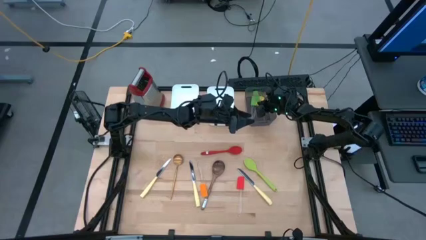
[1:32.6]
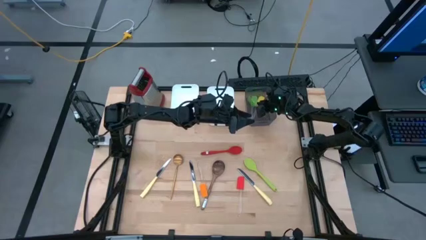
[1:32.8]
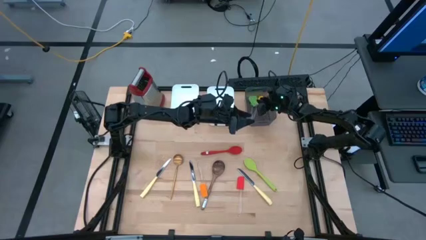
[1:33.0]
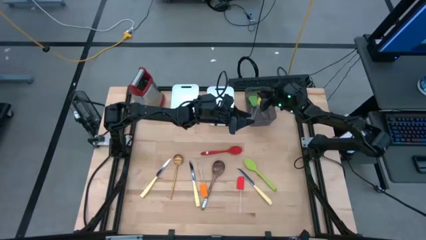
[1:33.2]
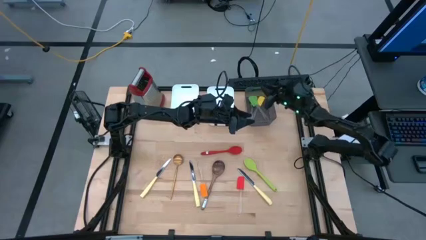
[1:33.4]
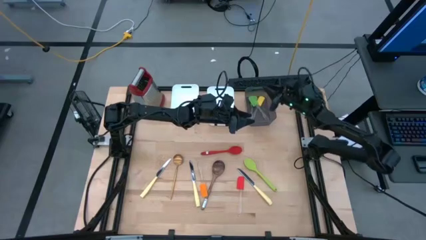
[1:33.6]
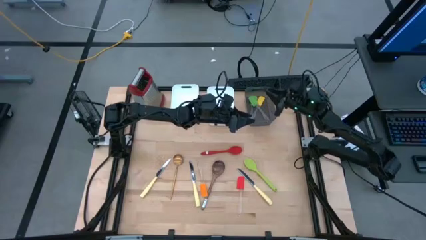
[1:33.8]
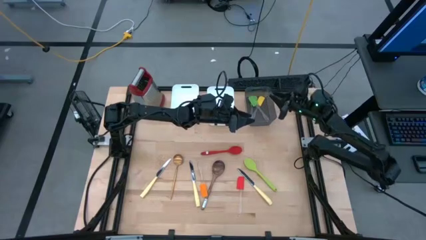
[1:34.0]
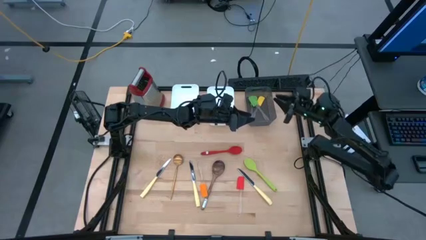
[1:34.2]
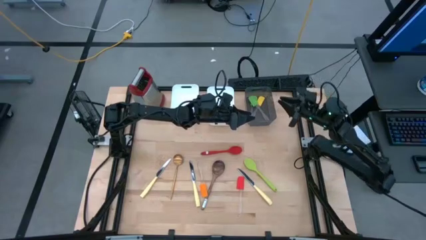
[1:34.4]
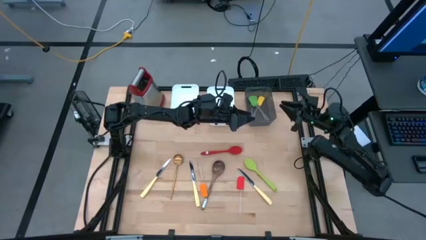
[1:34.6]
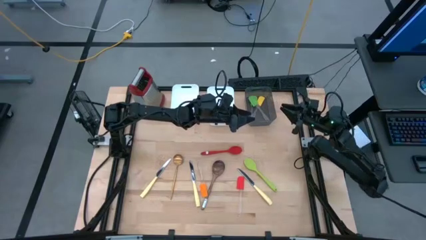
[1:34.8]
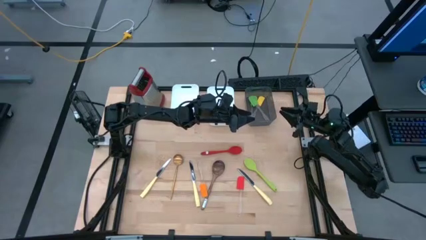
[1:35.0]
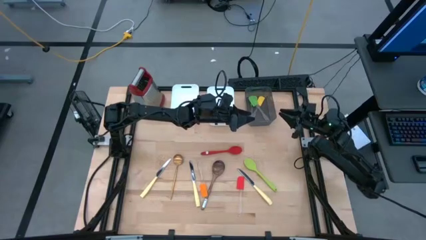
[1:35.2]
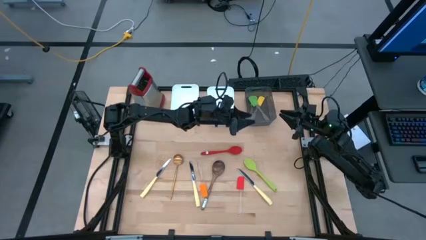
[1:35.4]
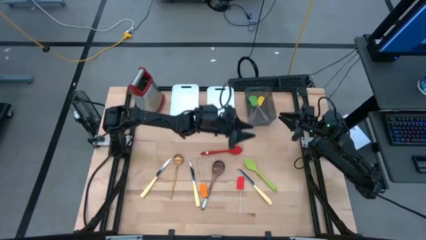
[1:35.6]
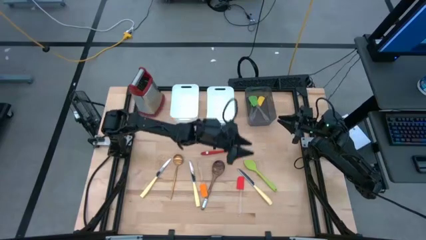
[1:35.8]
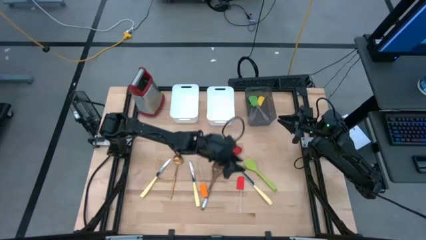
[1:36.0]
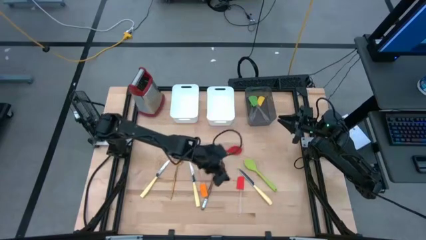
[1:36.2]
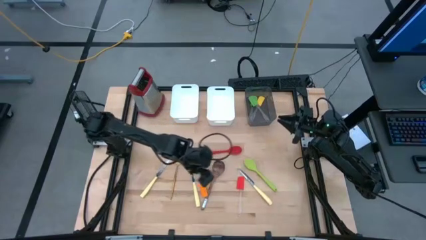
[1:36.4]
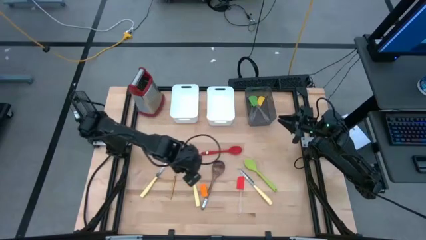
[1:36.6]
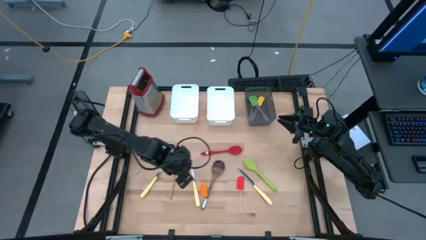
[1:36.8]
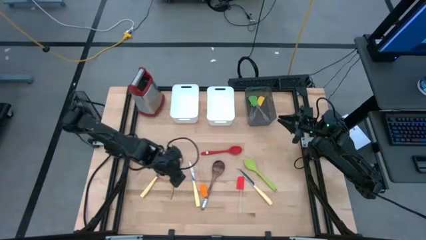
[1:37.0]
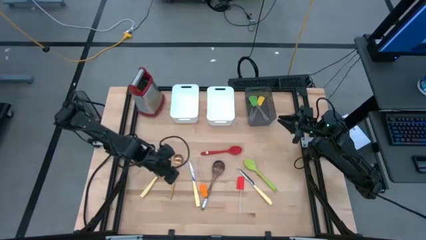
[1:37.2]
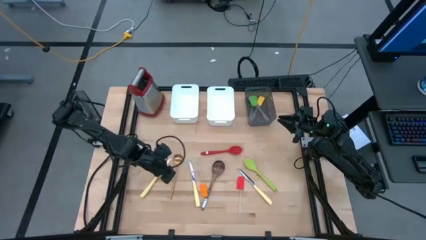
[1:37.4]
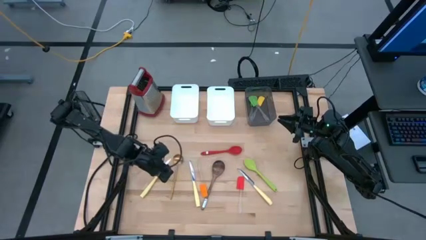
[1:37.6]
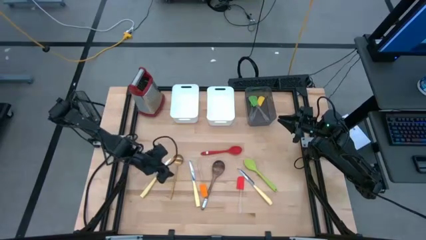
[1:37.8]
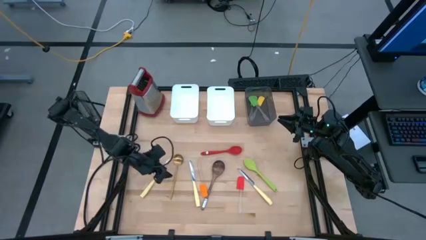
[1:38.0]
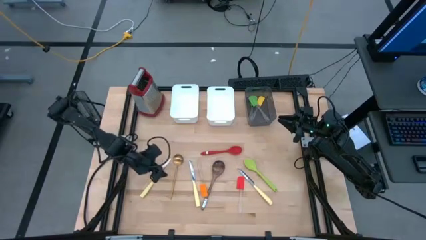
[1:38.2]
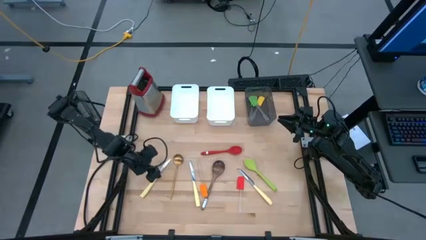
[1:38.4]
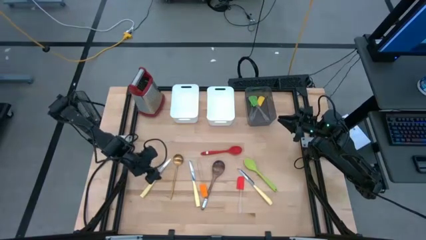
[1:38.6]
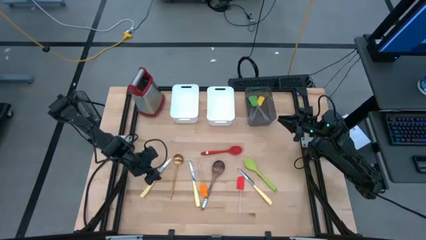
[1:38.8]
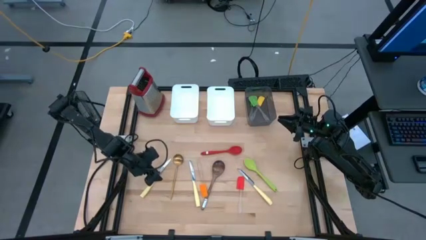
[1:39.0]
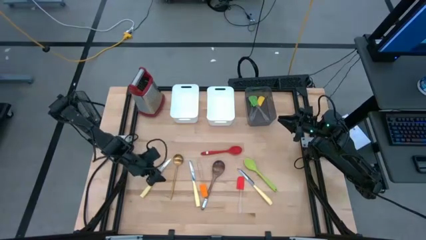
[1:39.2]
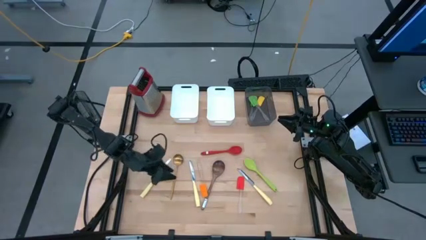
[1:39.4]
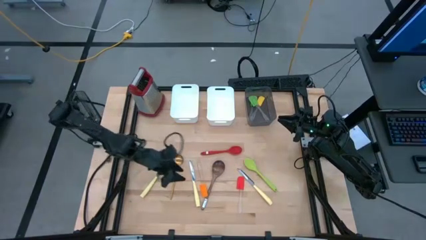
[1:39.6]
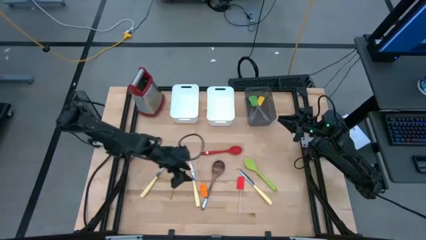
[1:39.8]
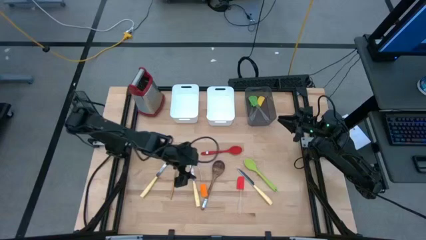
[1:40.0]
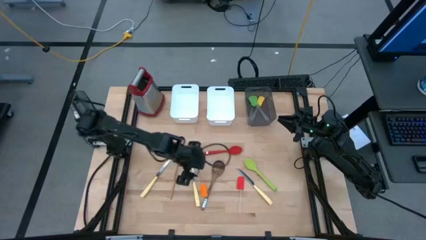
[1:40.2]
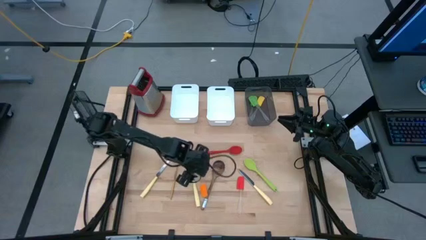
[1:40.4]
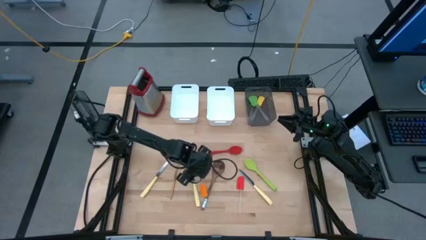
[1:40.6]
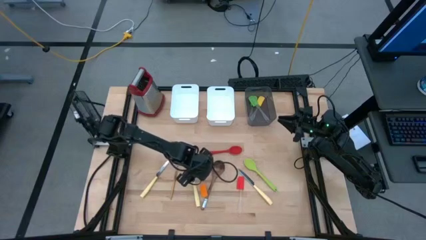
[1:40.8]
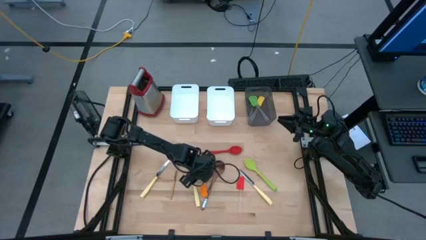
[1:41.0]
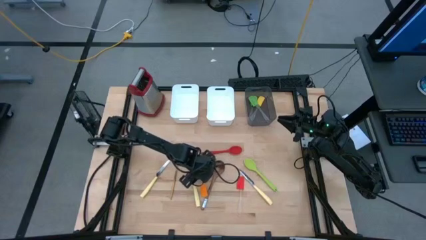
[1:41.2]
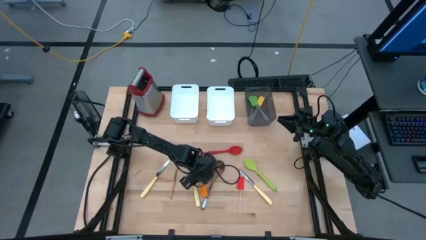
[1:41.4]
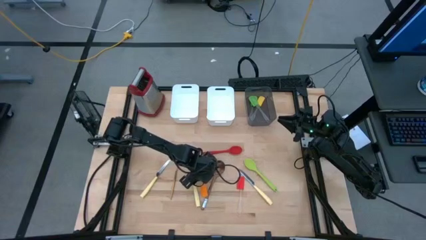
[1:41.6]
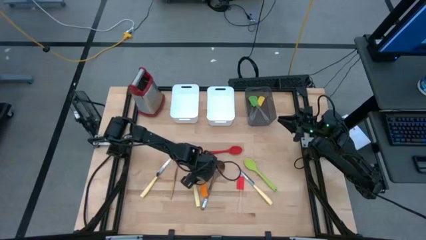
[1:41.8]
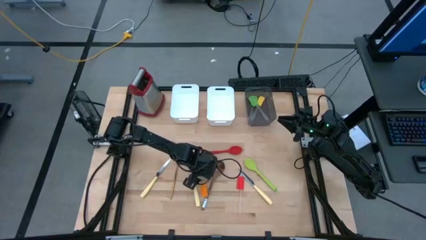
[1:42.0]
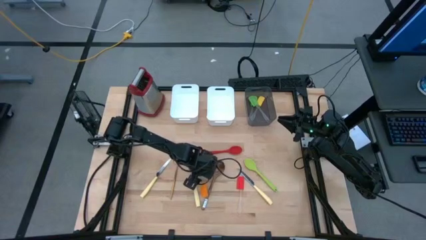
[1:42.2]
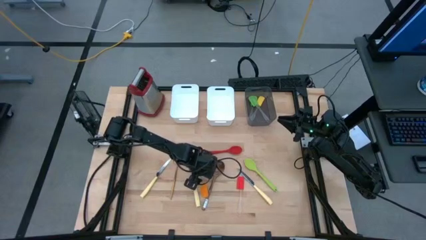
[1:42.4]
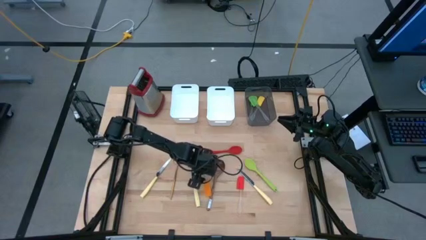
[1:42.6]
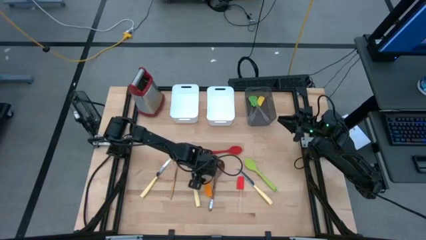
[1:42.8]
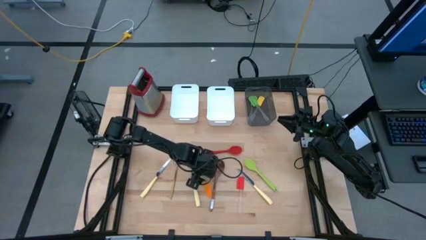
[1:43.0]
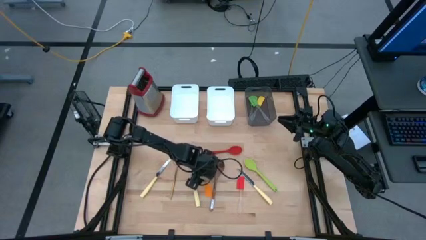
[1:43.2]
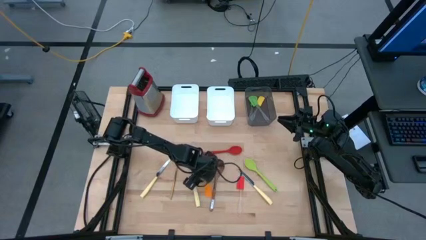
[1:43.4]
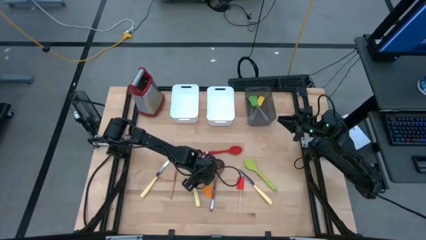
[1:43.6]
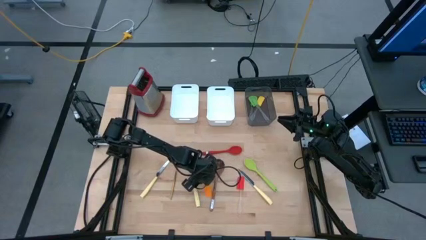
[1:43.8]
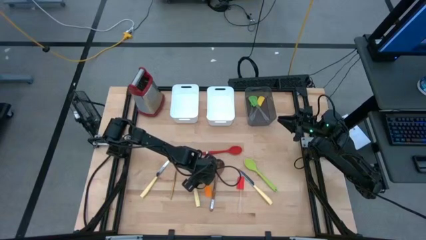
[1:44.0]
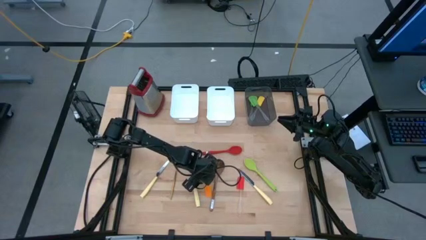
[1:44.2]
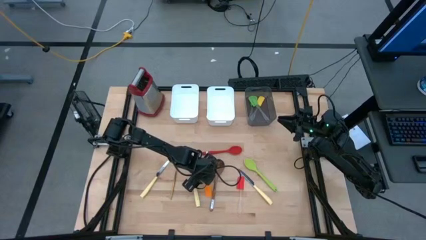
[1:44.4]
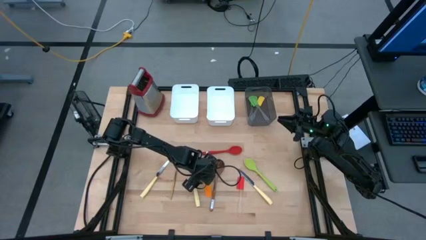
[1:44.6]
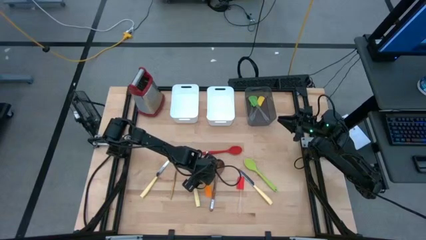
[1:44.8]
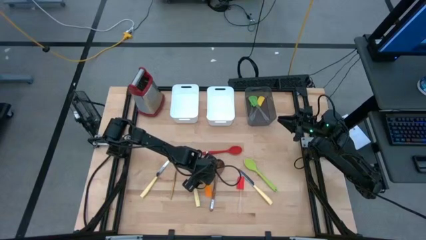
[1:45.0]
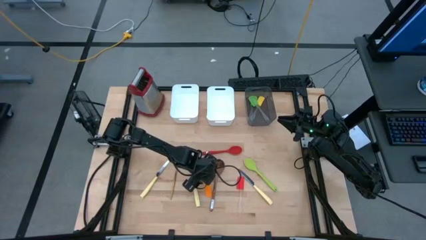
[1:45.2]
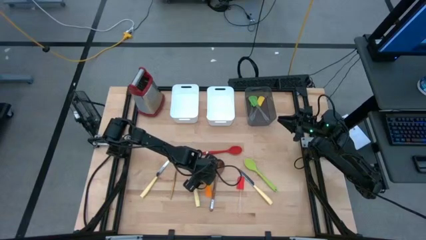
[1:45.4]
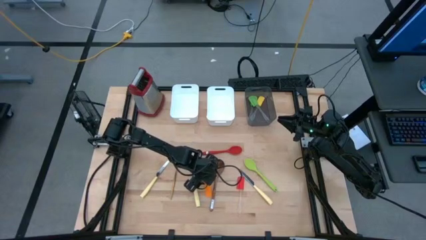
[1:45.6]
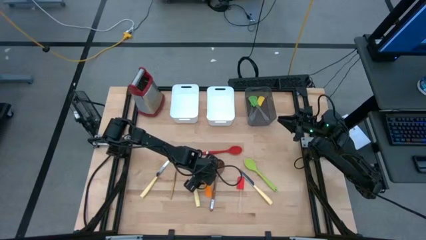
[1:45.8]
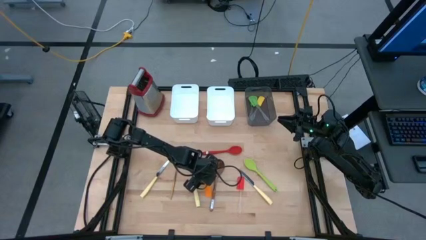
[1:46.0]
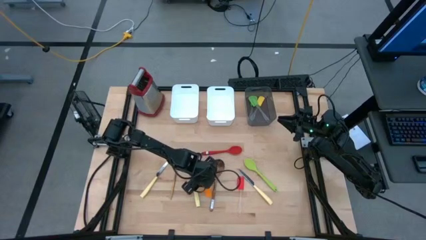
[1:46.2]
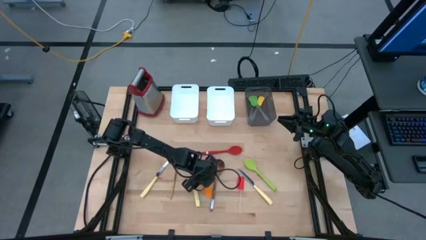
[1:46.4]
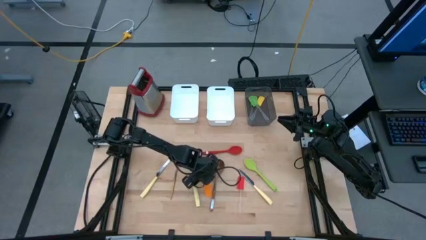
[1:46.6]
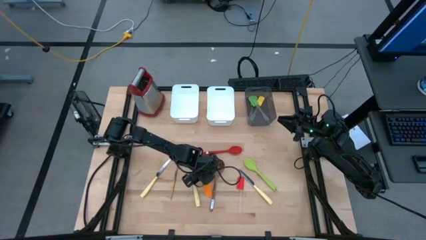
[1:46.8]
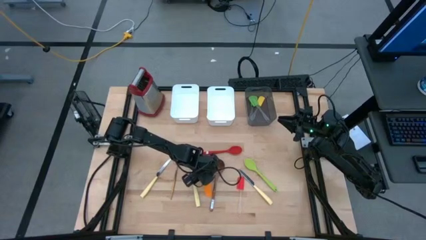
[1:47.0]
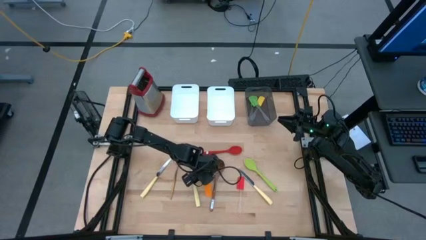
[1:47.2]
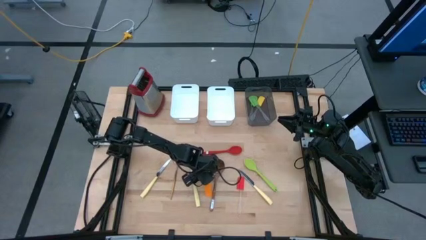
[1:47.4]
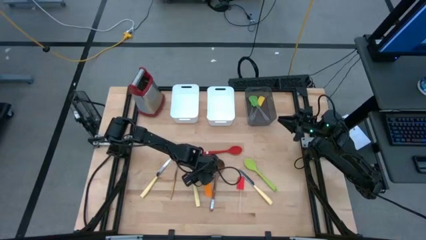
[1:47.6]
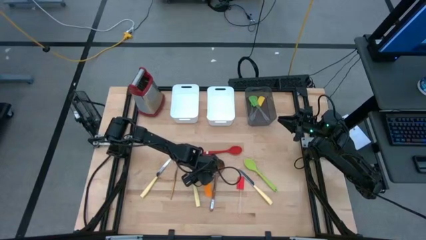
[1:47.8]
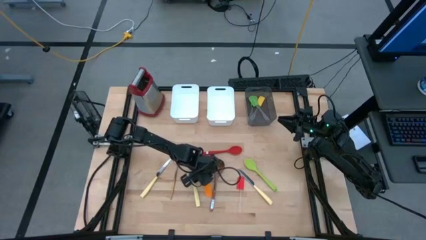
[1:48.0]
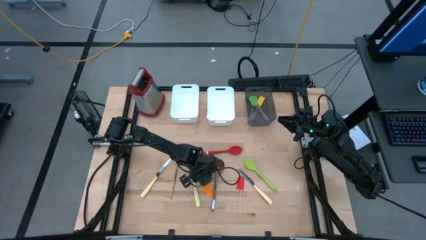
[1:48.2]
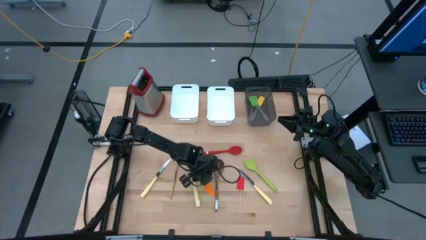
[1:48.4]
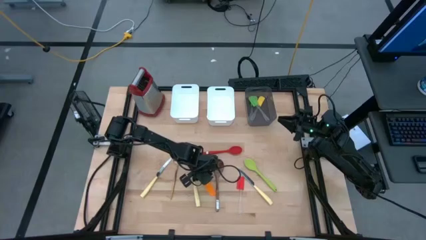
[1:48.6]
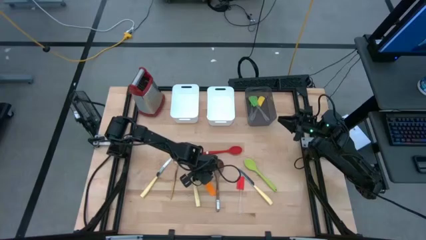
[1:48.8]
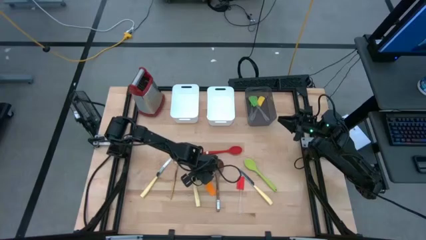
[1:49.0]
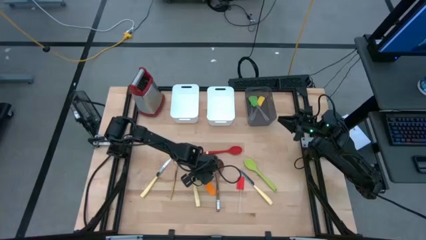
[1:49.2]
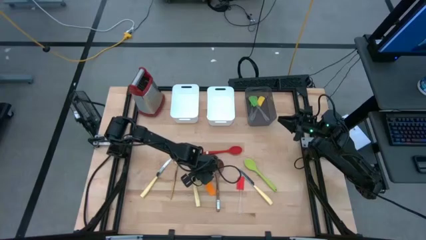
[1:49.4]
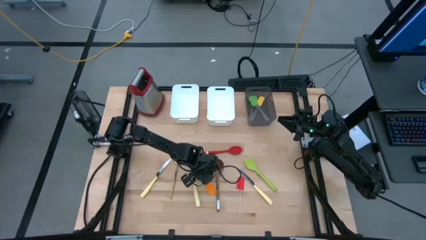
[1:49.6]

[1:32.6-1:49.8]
Task: Pick & Place Kitchen Items
Put the orange silicone spatula into the black bin
